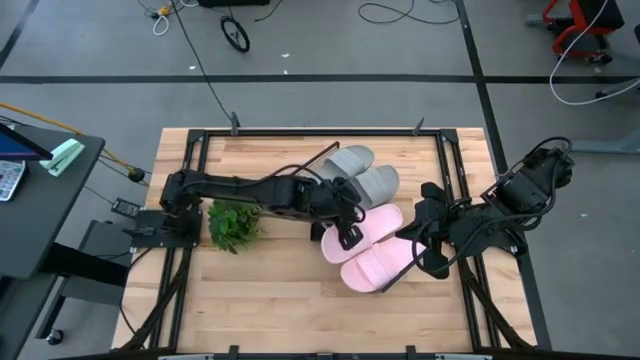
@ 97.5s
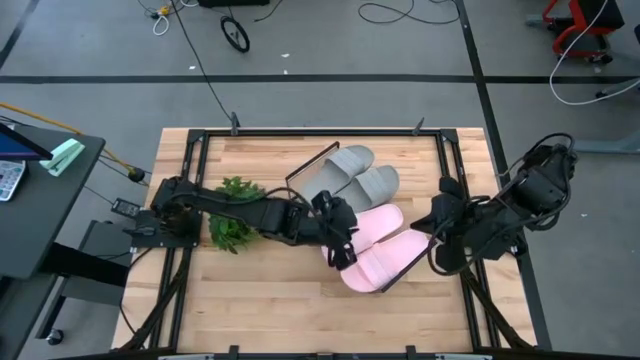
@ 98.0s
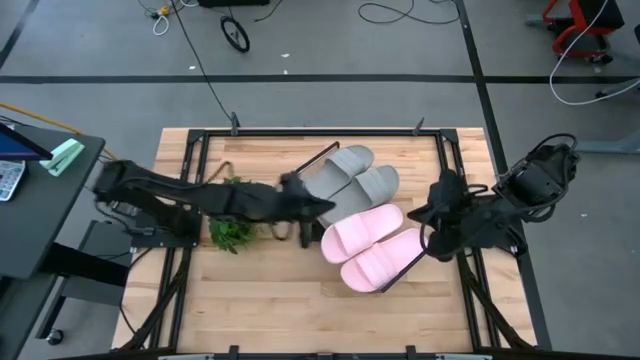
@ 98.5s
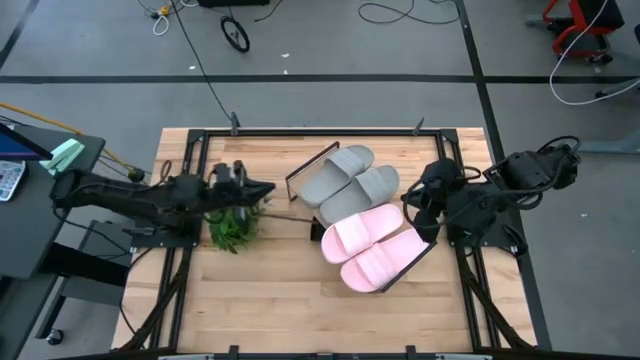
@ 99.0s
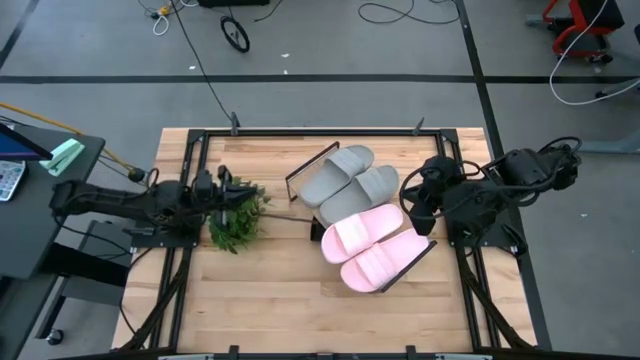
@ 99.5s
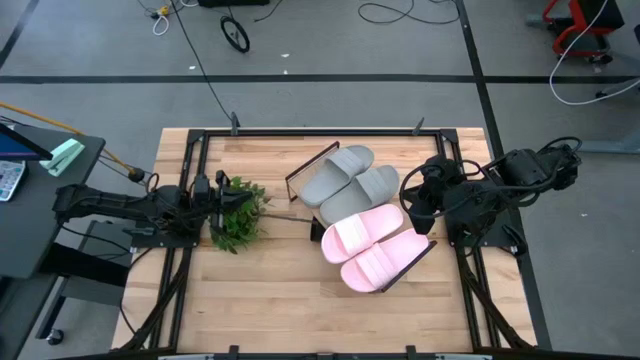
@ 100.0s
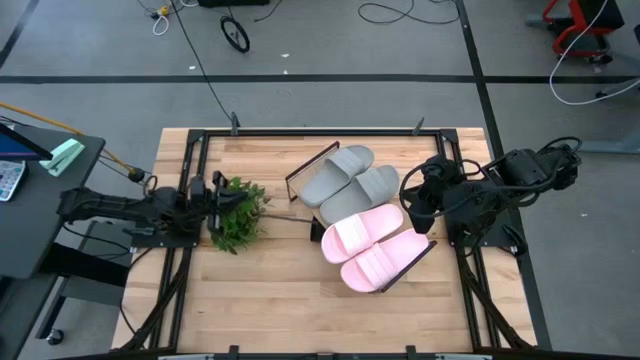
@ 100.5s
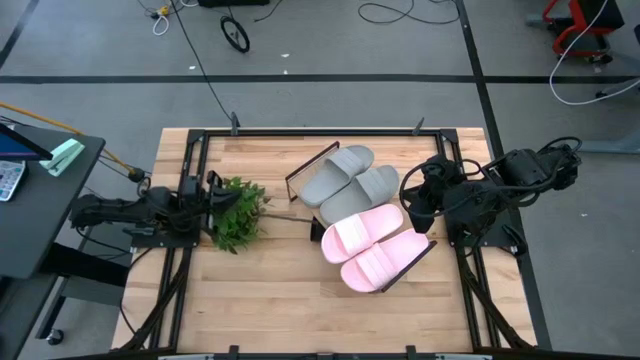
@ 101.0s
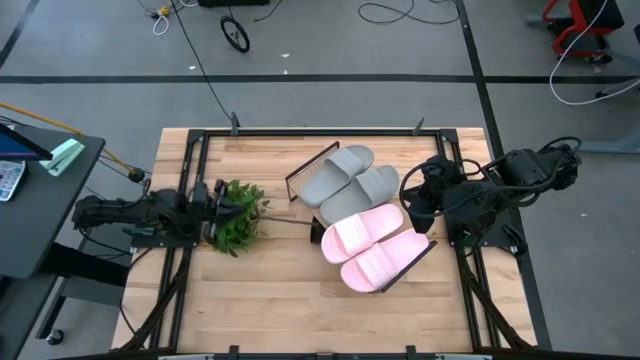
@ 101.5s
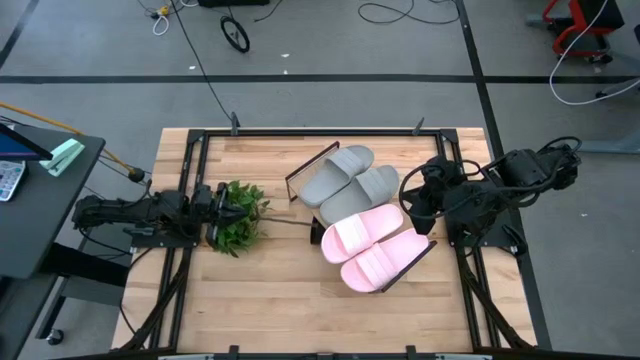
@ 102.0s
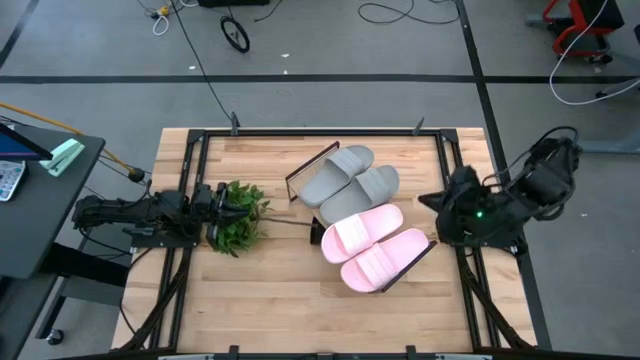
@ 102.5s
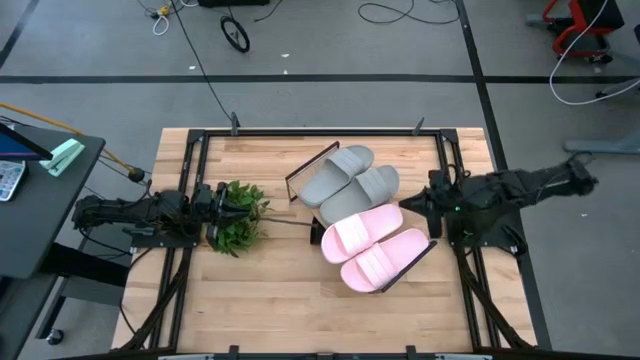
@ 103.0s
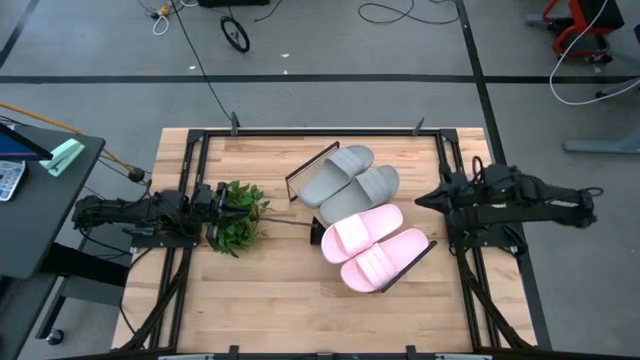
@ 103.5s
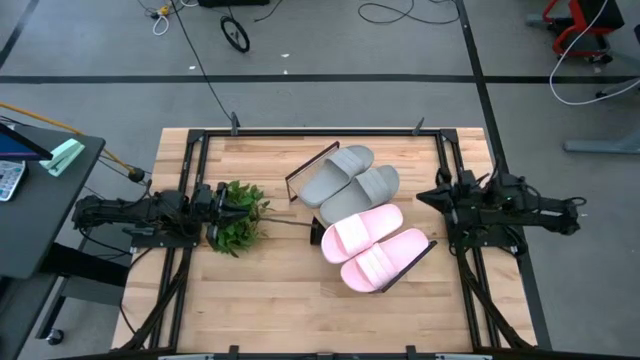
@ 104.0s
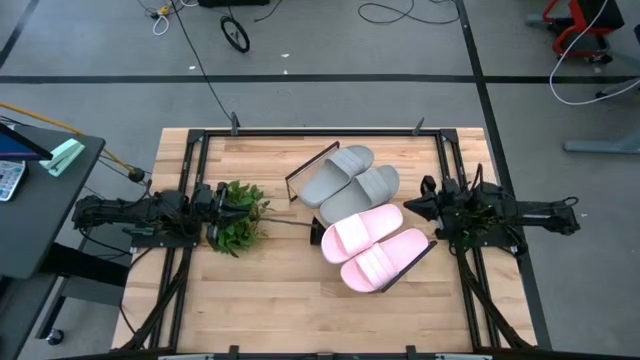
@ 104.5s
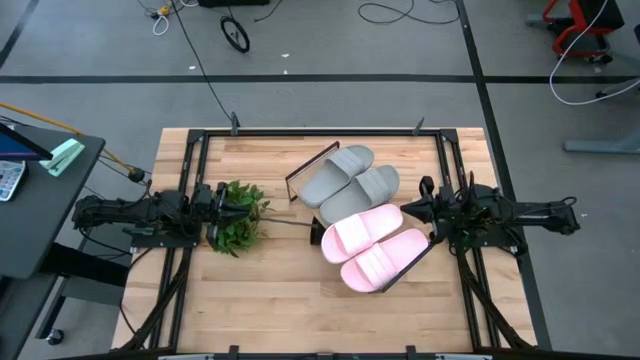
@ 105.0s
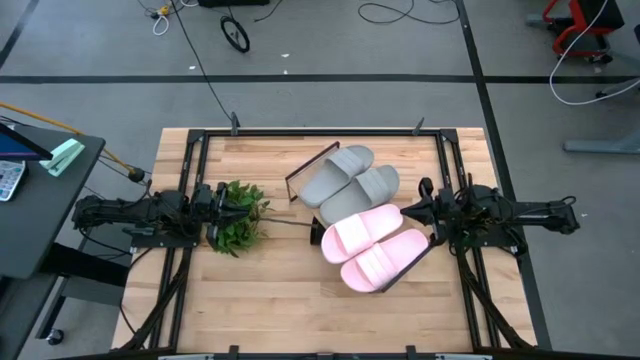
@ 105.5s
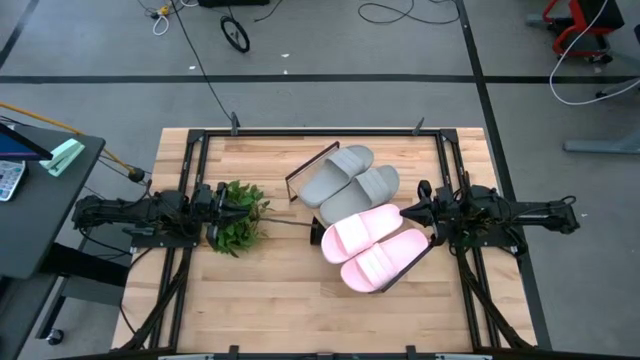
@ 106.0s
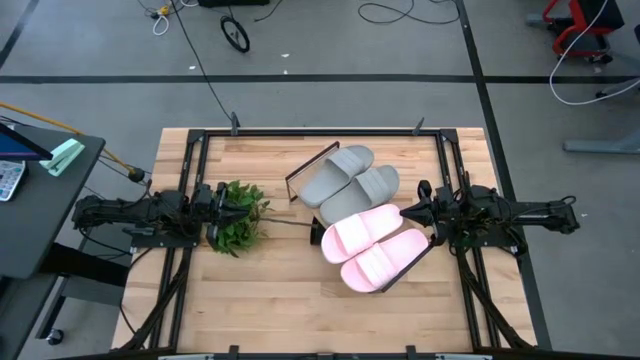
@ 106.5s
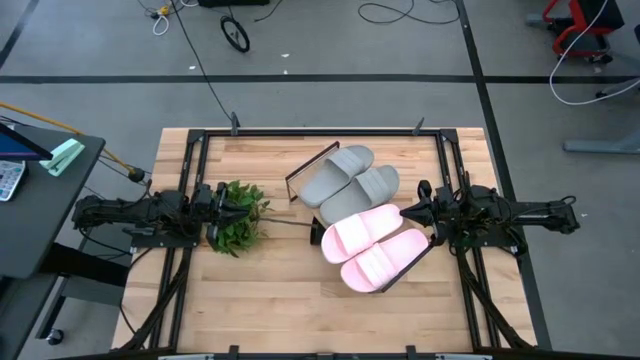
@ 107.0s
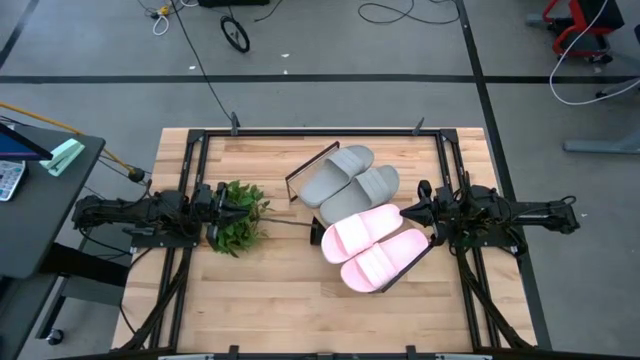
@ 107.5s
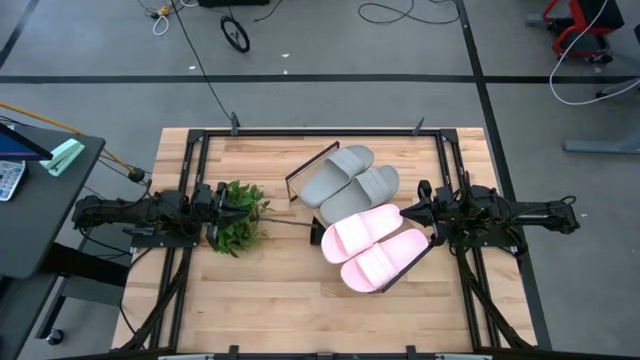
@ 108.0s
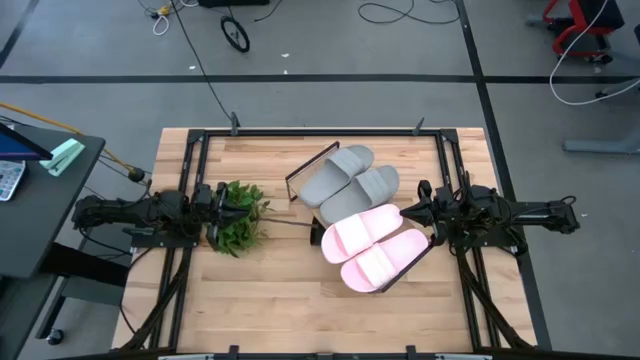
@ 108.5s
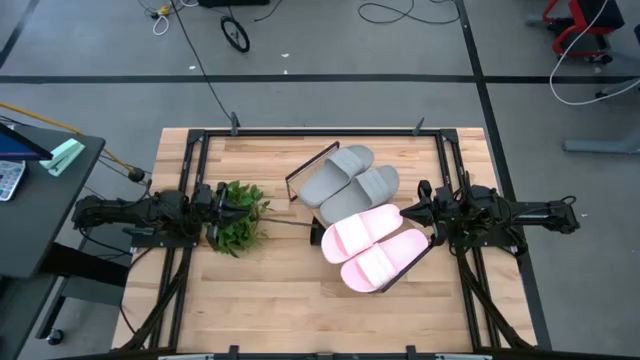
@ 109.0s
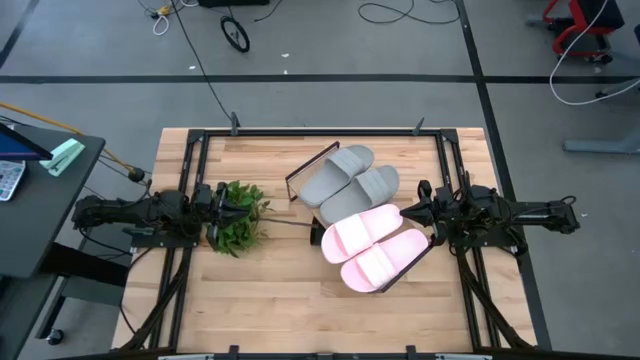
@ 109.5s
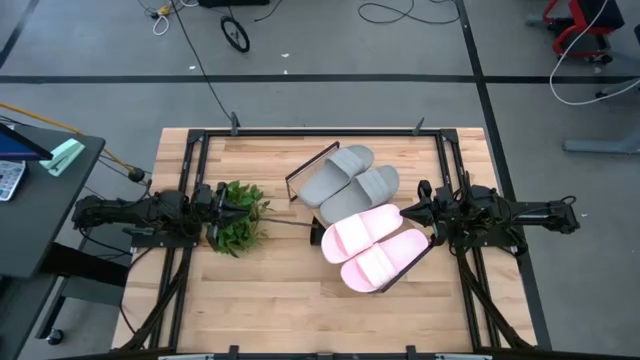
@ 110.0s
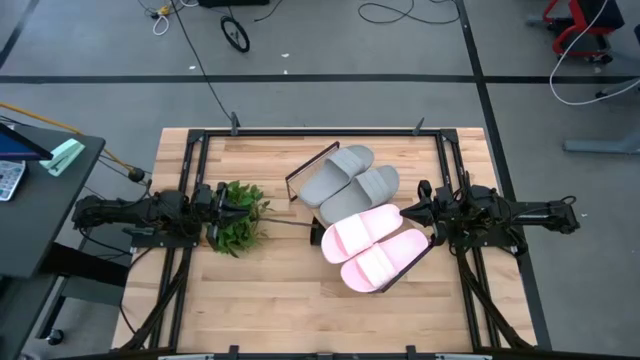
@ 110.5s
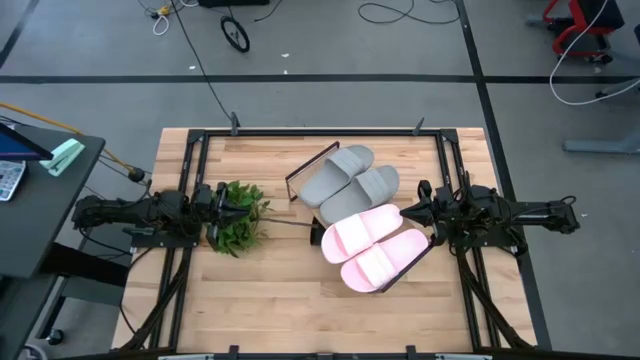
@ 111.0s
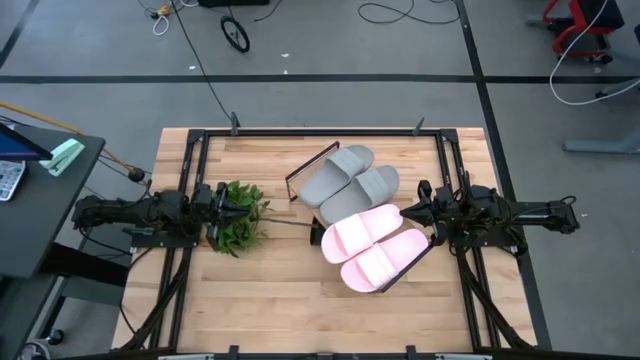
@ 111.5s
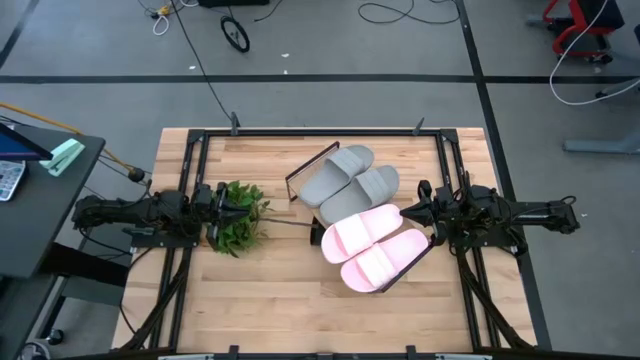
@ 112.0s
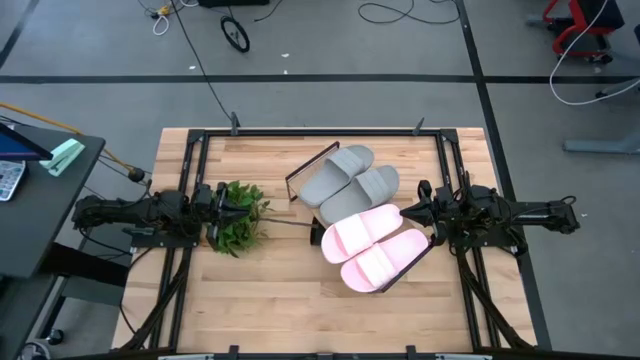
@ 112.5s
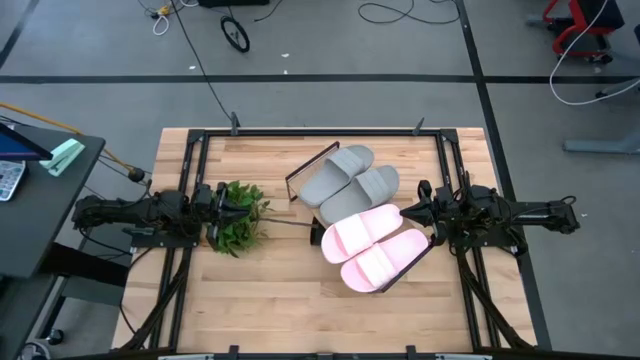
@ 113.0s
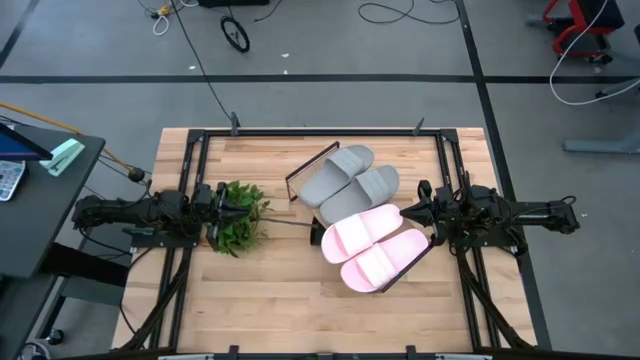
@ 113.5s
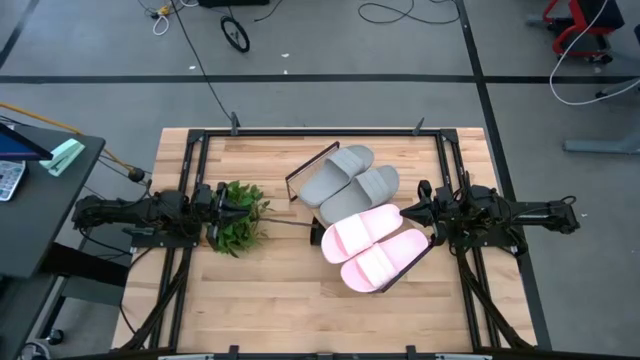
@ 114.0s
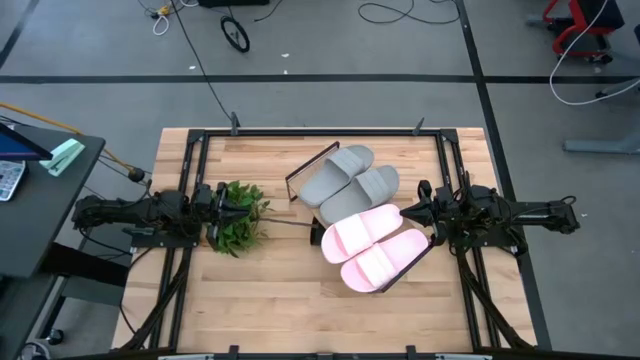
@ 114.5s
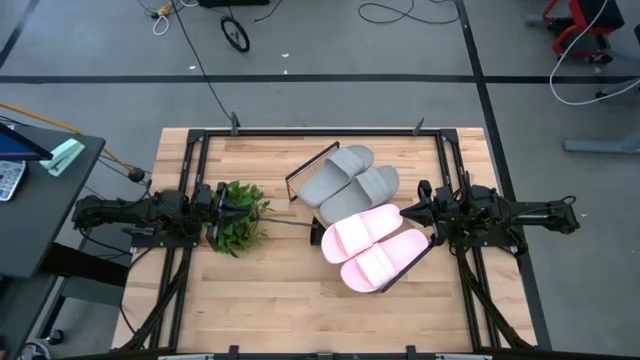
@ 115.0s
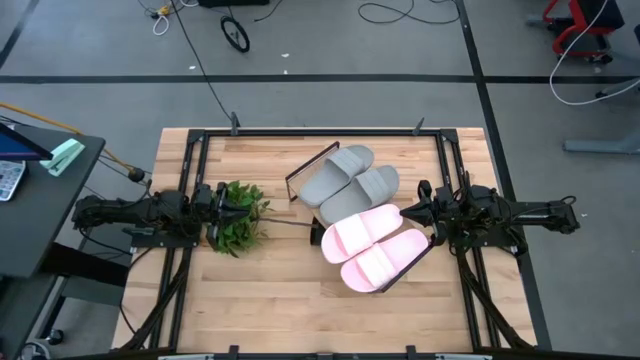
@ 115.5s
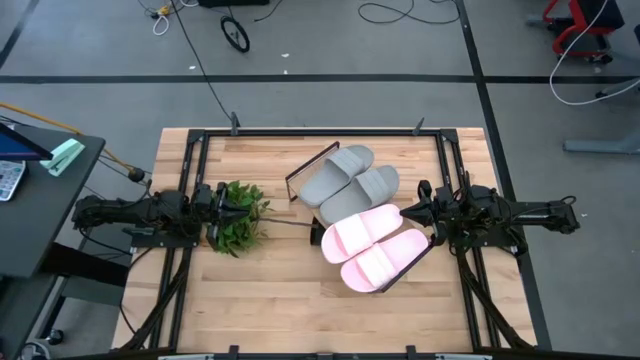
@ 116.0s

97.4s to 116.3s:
Task: Pick and place slides into the shelf
Return to Home Position

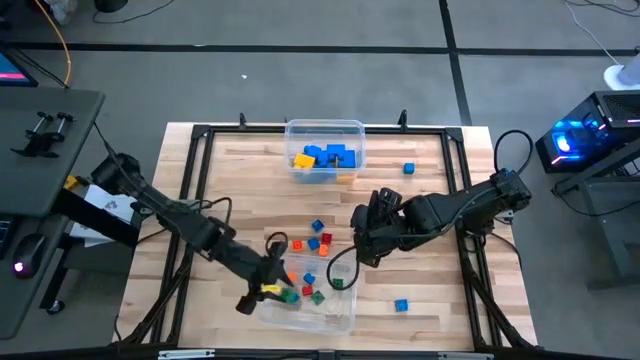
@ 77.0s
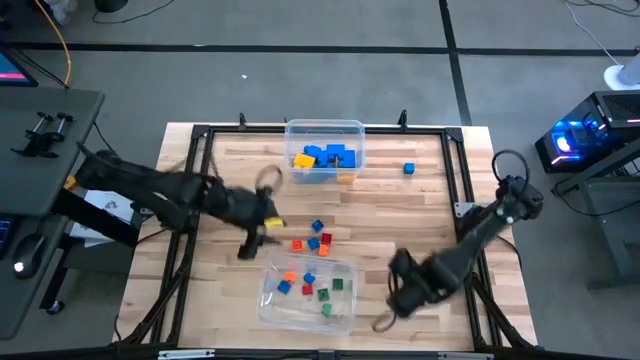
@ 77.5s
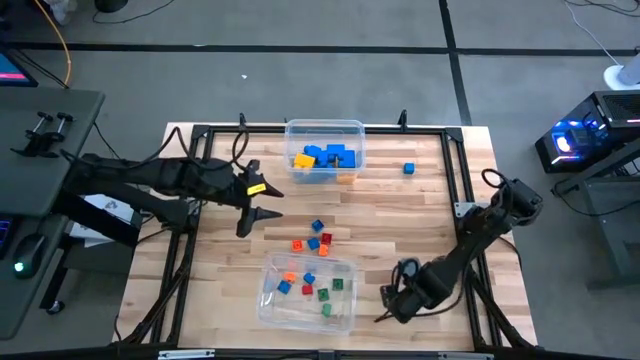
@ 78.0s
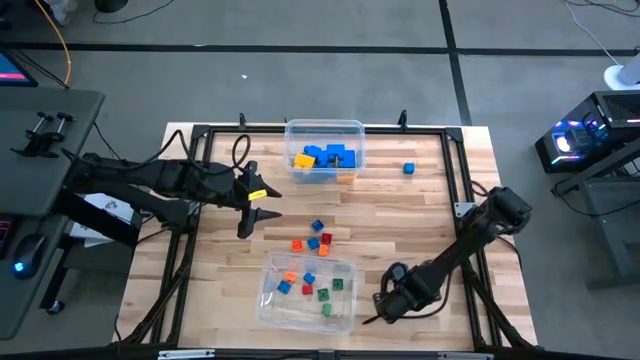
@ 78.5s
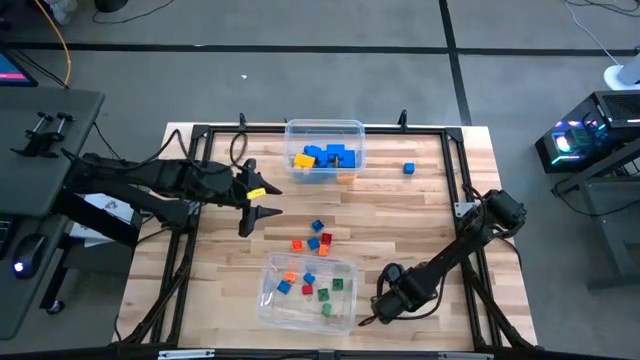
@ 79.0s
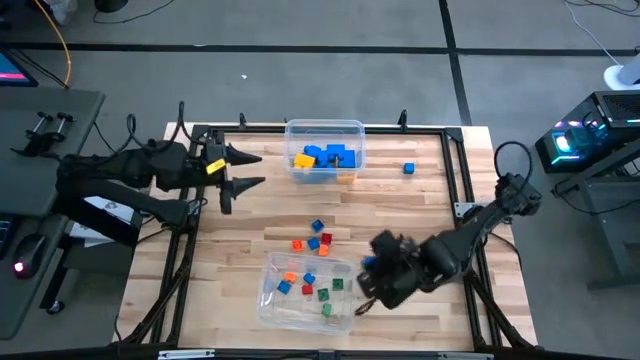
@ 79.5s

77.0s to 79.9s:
Task: Sort blocks by size
Put the bottom right blue game piece into the bottom transparent bin
